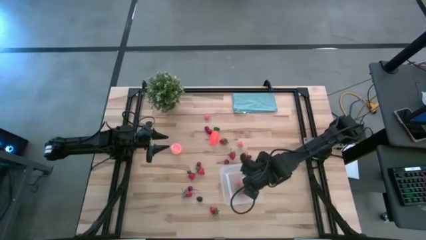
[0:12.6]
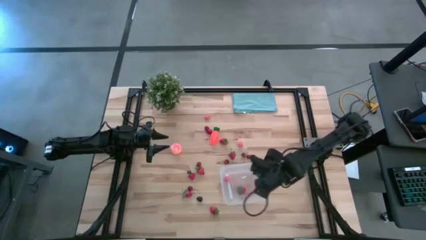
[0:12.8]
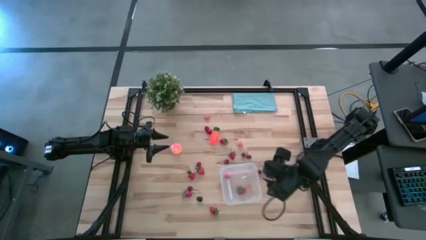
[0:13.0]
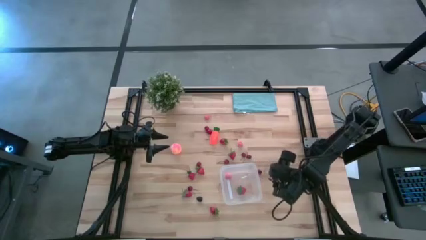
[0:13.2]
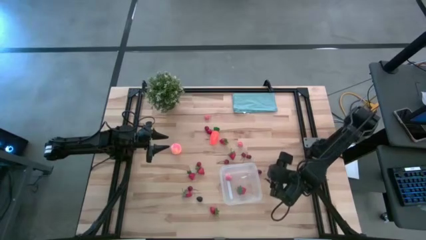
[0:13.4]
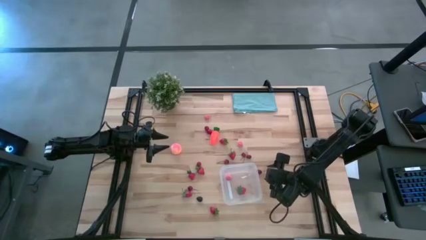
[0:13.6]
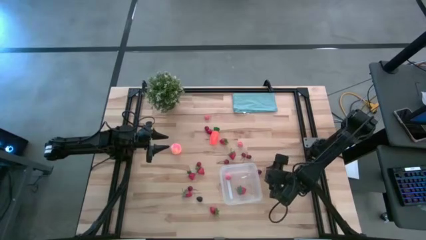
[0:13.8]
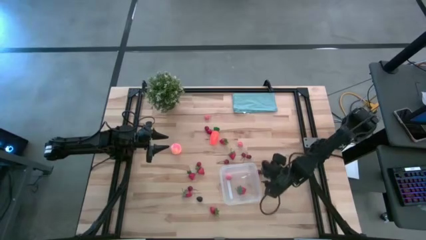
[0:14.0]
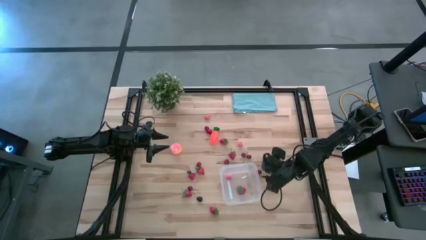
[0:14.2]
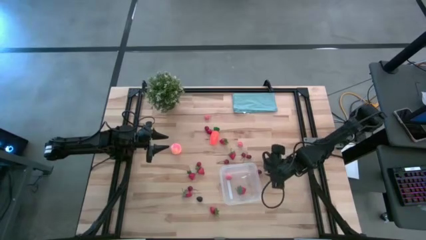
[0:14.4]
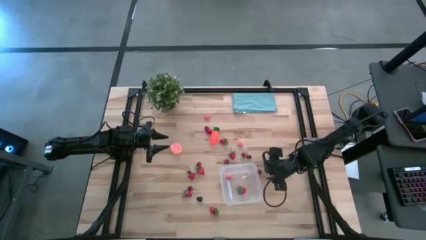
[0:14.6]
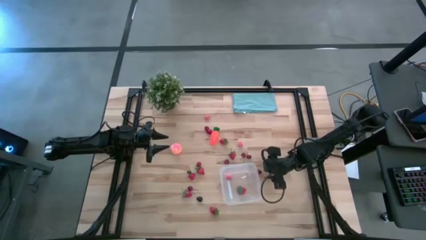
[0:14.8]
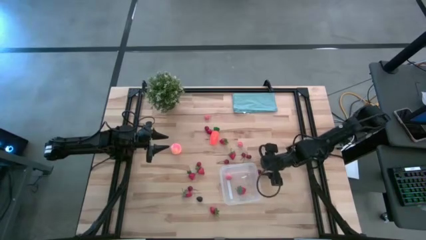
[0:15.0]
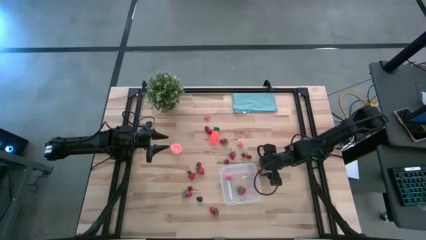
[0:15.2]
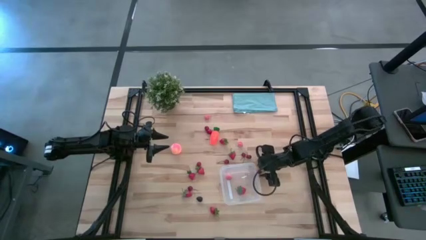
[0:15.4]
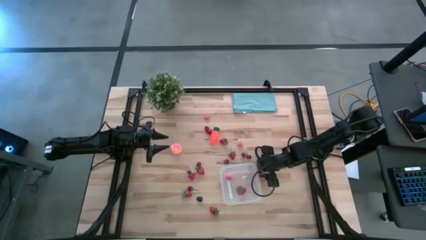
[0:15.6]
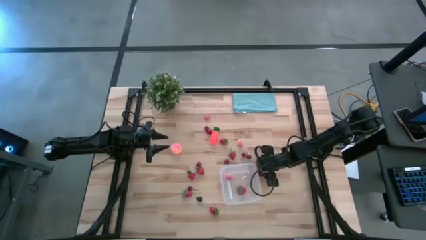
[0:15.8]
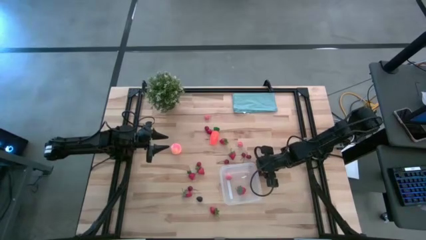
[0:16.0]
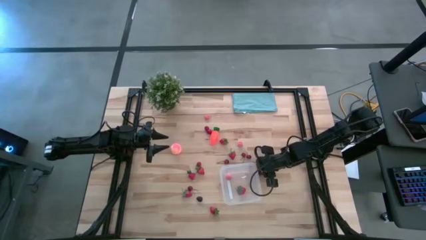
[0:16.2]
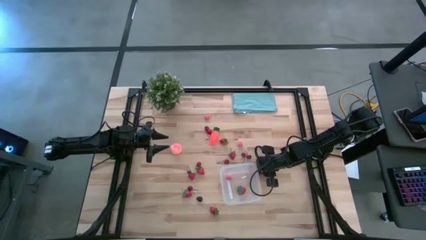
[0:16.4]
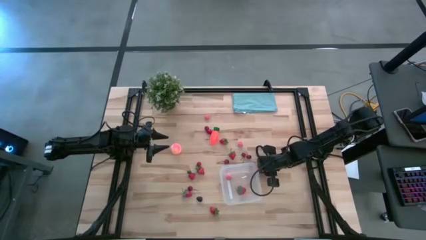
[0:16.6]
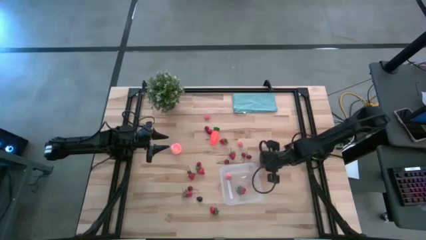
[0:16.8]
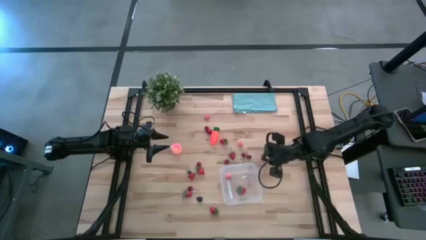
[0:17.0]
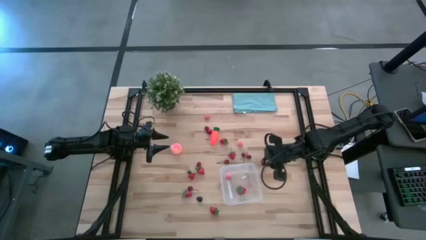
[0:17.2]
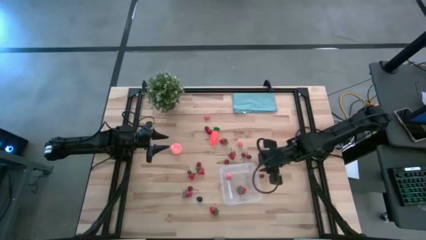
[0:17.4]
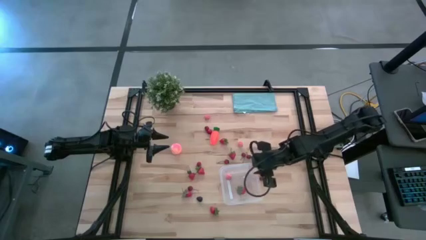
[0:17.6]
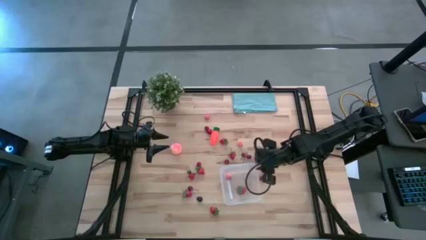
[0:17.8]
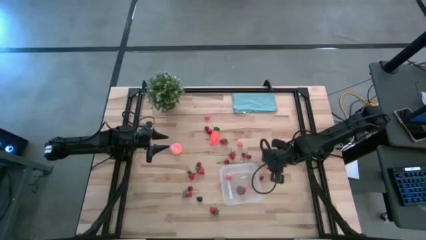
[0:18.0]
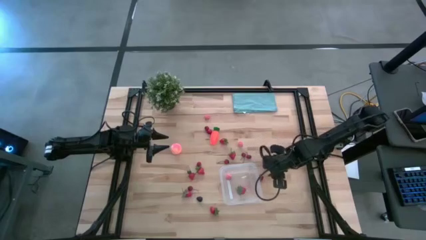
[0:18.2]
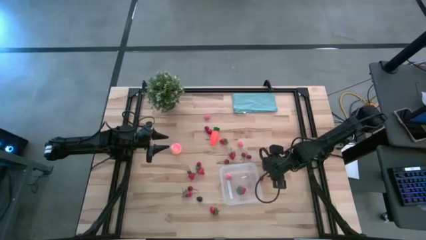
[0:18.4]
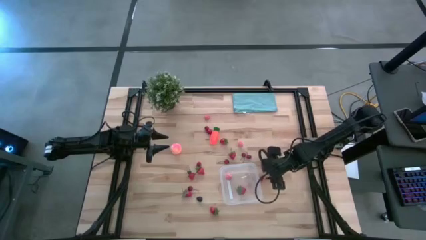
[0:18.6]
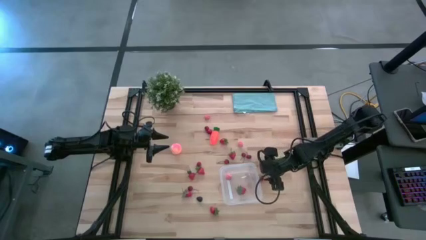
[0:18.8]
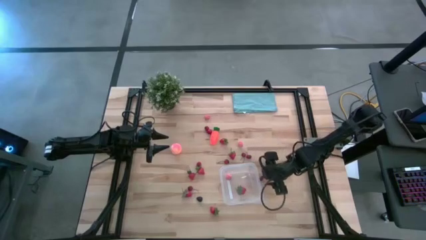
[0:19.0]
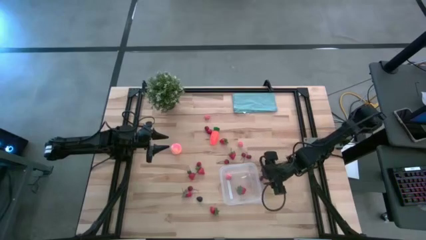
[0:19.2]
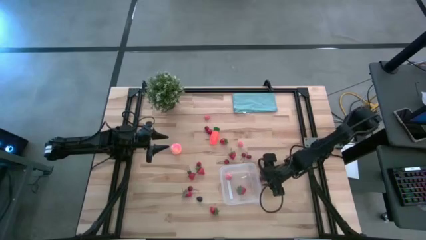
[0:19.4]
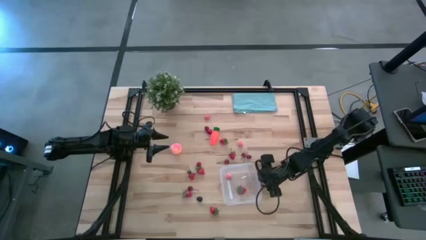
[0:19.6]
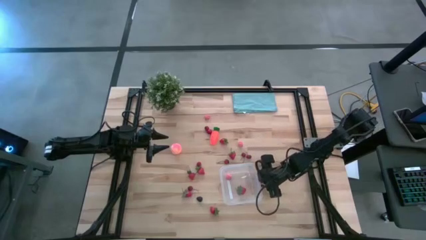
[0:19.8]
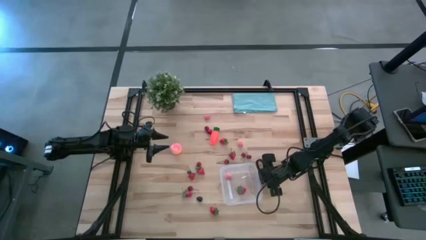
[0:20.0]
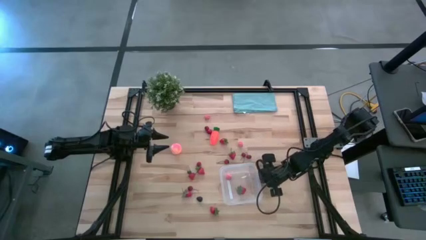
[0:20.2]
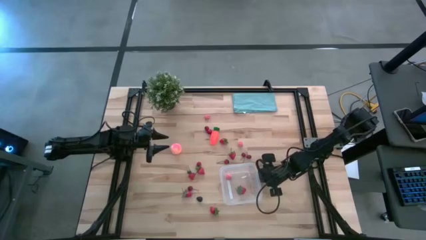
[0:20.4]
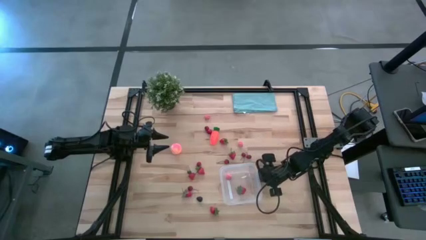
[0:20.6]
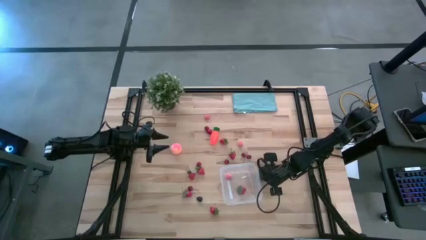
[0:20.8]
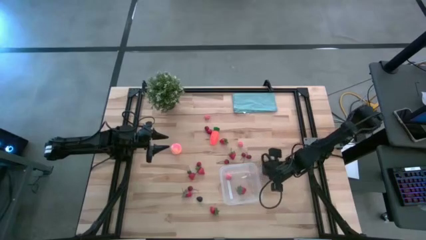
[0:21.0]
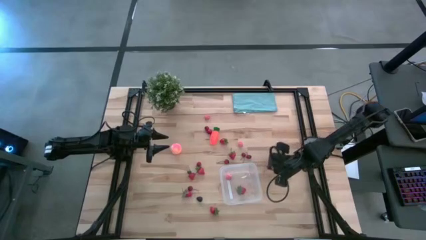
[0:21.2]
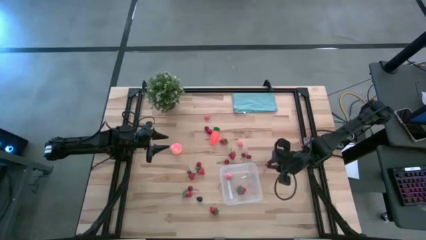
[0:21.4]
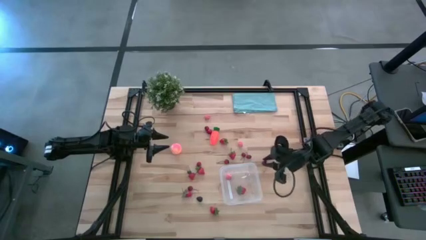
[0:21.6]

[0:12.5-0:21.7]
Task: Pick and placing Produce into tupperware
Put the red cherry into the transparent container

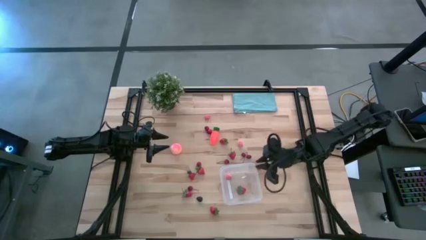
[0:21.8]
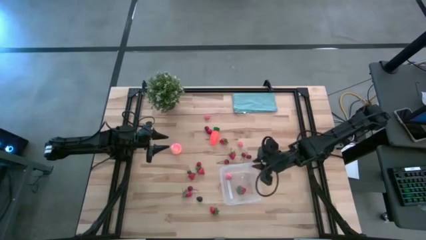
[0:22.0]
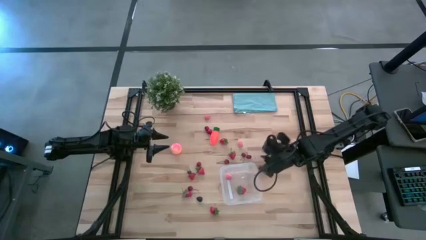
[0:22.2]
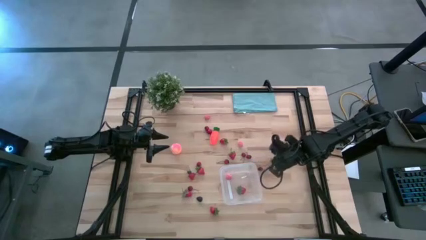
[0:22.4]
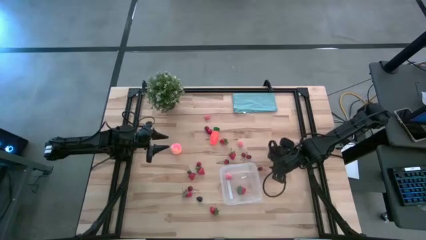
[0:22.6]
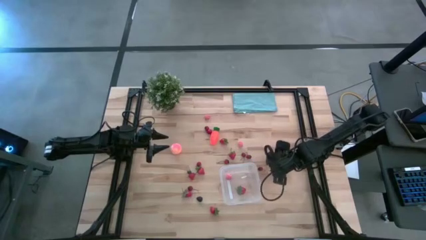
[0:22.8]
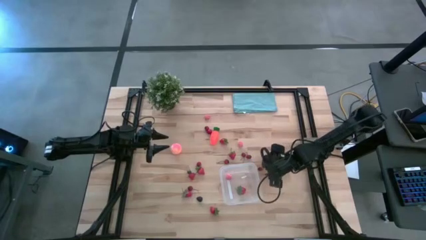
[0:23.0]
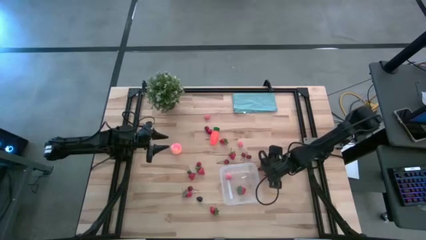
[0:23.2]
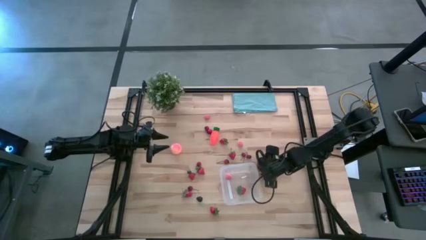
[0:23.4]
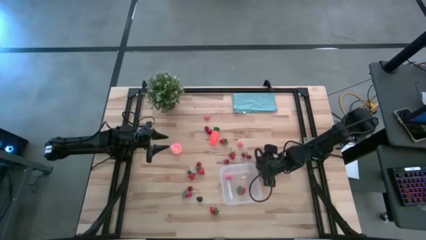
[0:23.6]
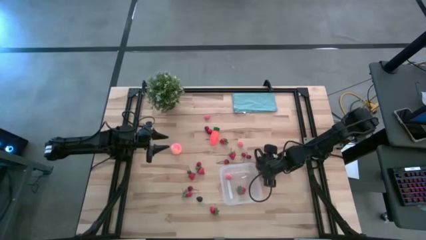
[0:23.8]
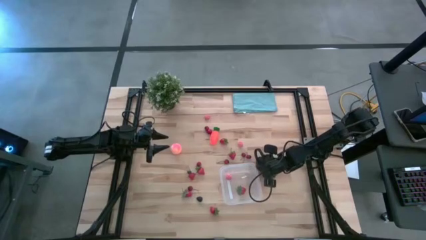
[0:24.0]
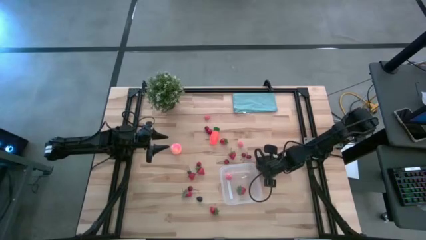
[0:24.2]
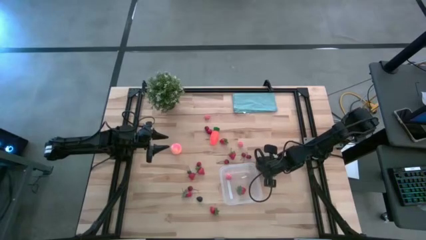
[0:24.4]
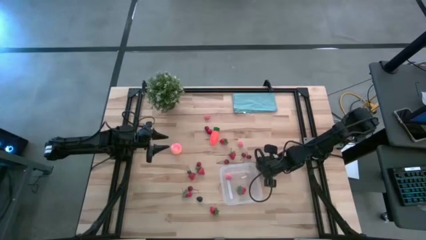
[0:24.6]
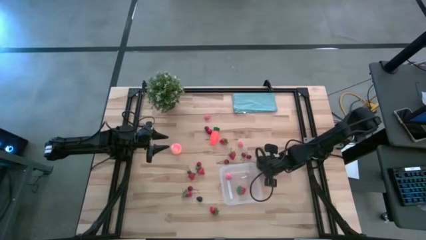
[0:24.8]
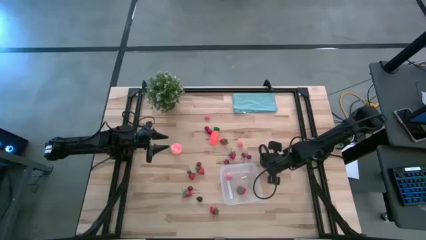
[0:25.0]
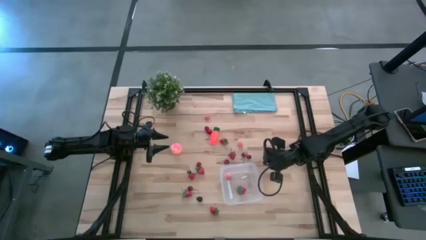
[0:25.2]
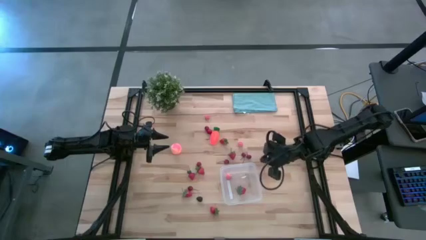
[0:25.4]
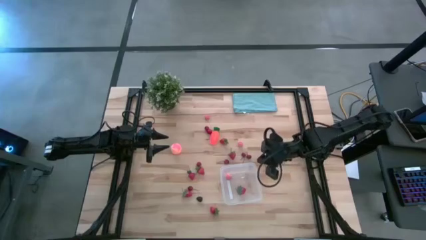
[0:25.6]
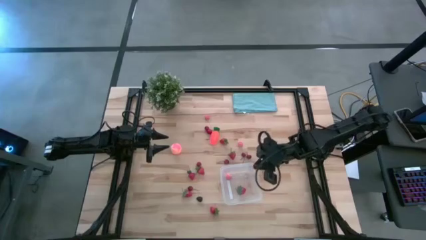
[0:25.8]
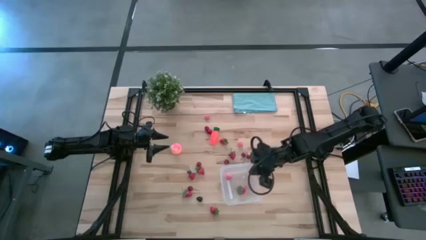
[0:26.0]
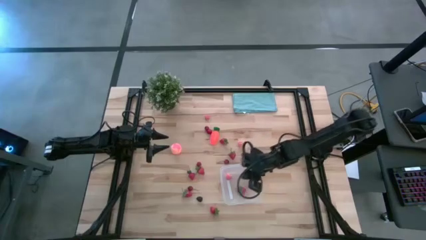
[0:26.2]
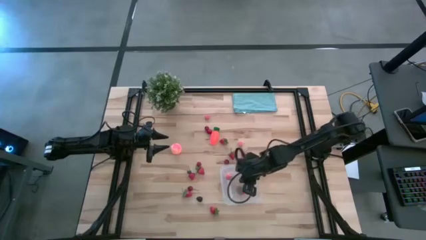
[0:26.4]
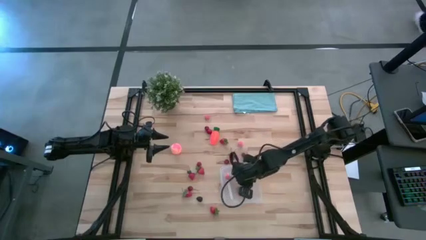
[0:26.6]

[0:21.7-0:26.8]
Put the red cherry into the transparent container

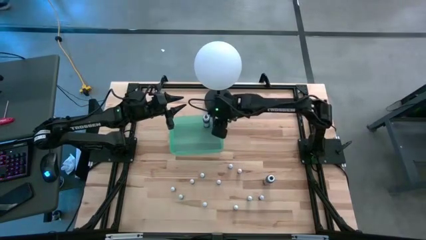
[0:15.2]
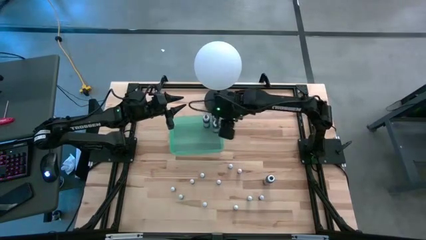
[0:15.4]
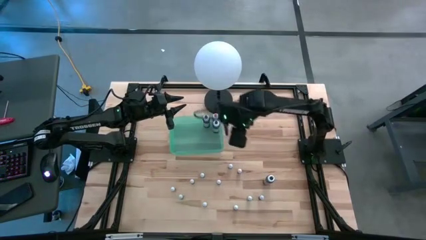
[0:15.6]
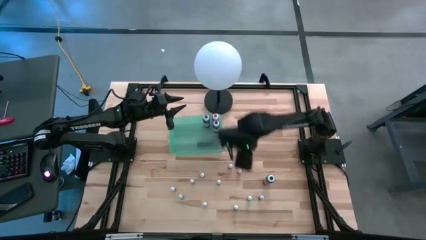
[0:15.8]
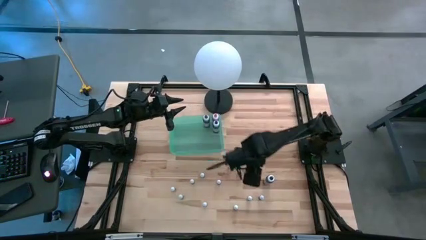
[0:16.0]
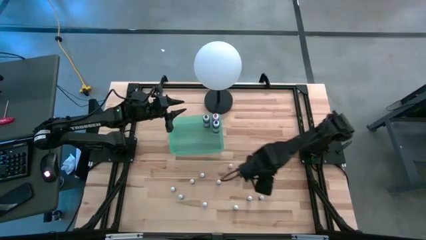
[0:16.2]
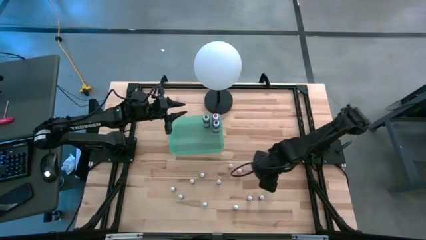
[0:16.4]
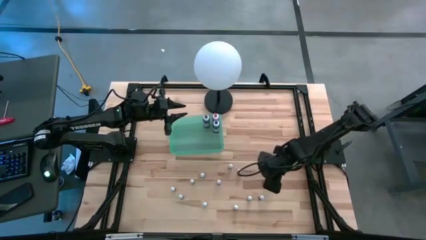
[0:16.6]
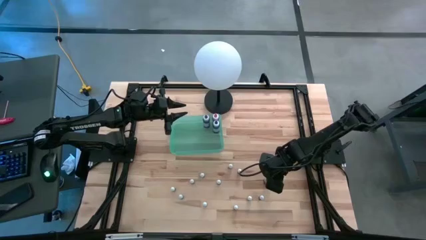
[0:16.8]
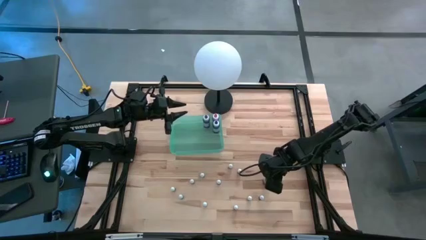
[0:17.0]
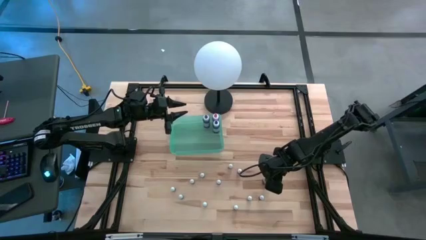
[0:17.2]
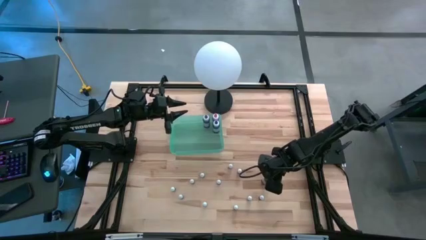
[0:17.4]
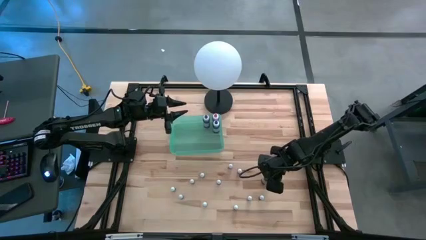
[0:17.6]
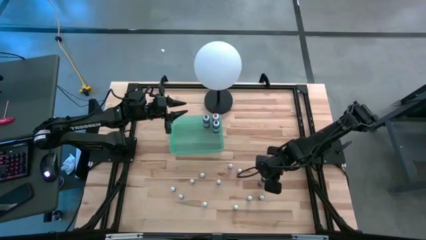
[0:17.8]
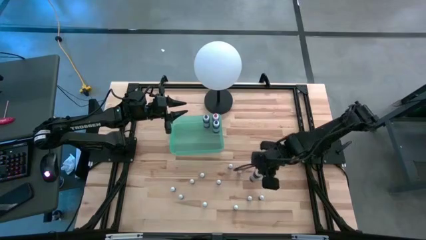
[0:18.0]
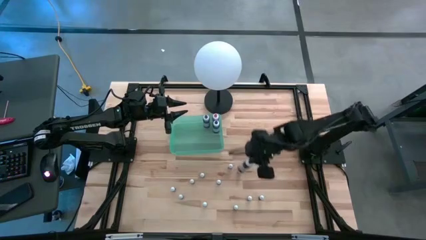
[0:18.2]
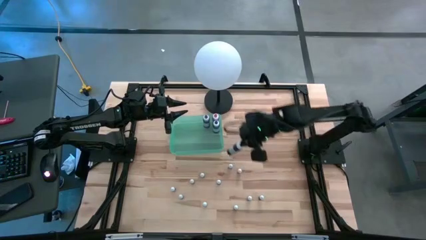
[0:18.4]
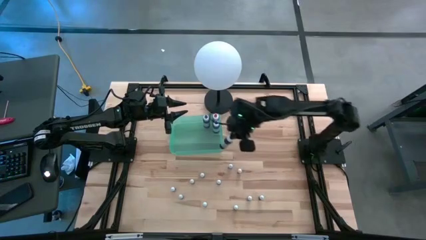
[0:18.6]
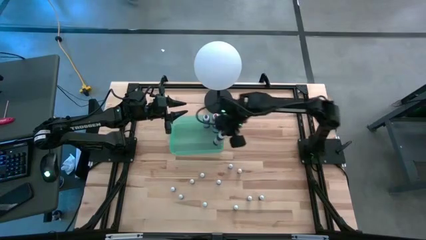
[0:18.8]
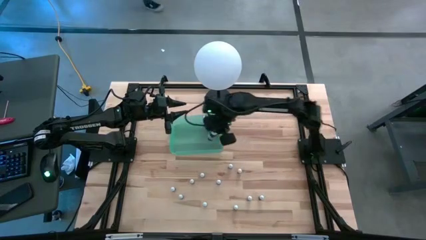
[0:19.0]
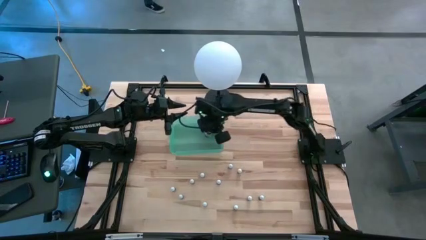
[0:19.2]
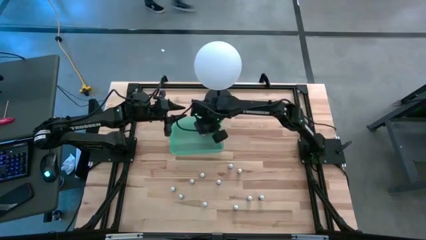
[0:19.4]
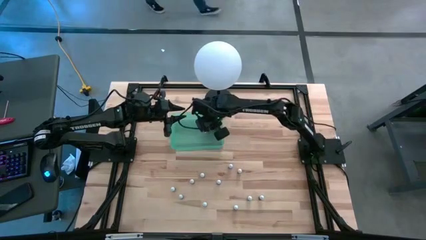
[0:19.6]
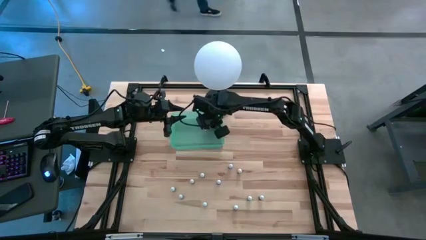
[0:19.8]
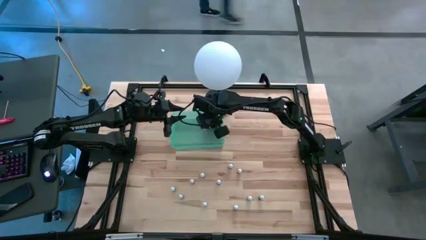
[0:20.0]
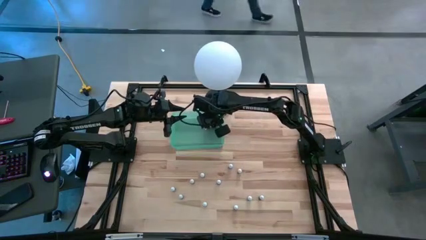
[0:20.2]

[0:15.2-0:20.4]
Task: Pick & Place food coloring
Put the big black food coloring bottle into the green bin
